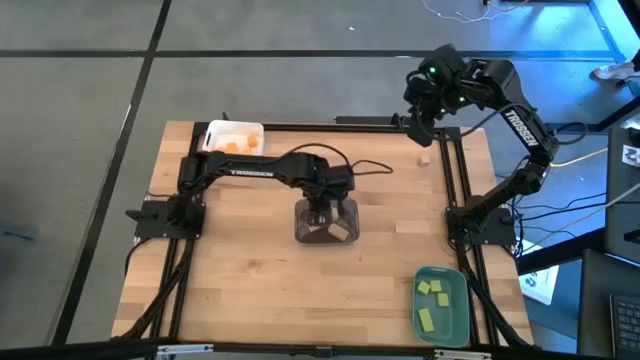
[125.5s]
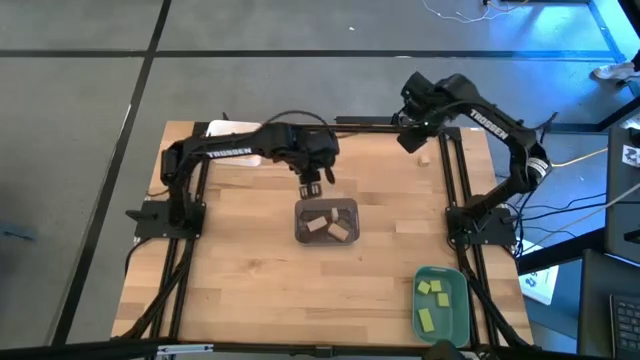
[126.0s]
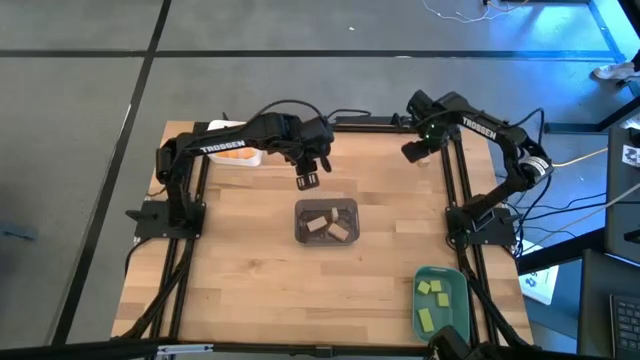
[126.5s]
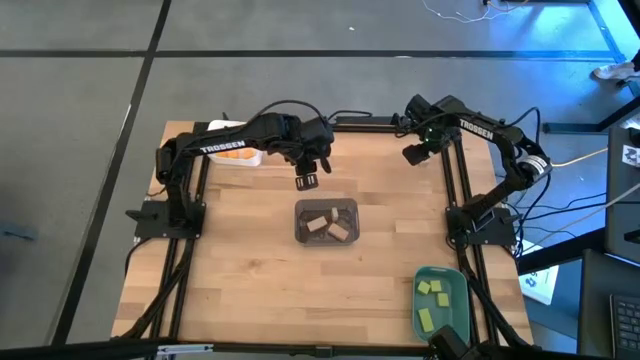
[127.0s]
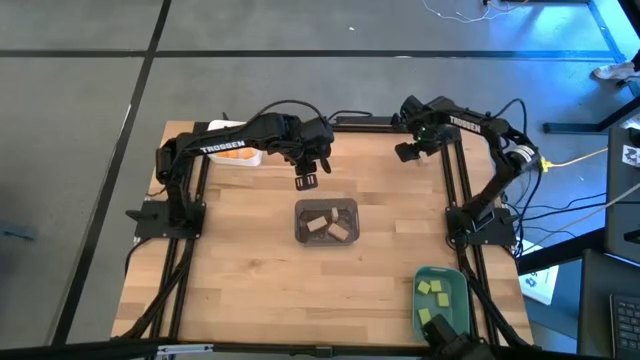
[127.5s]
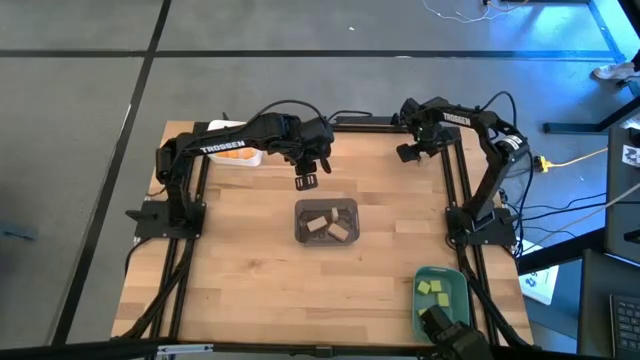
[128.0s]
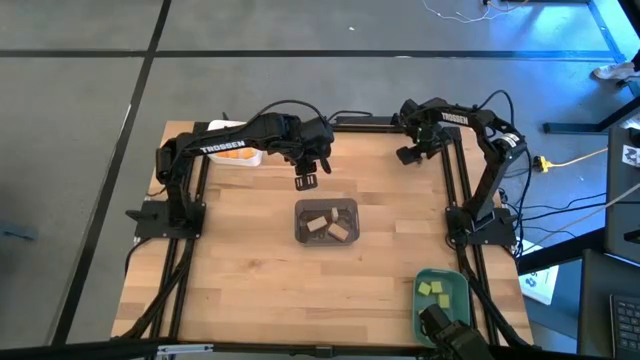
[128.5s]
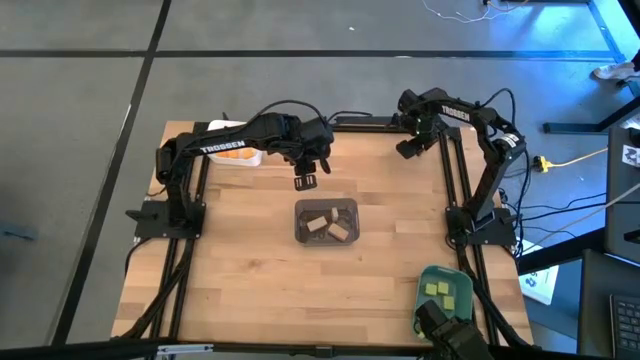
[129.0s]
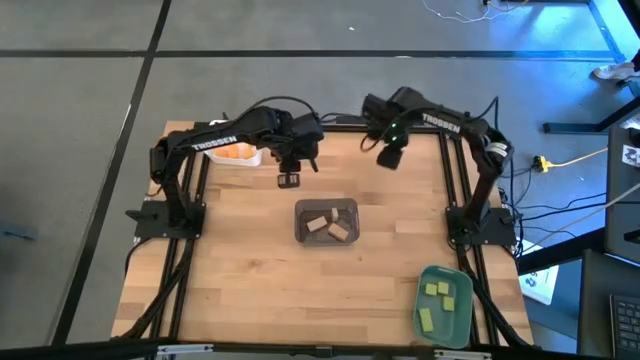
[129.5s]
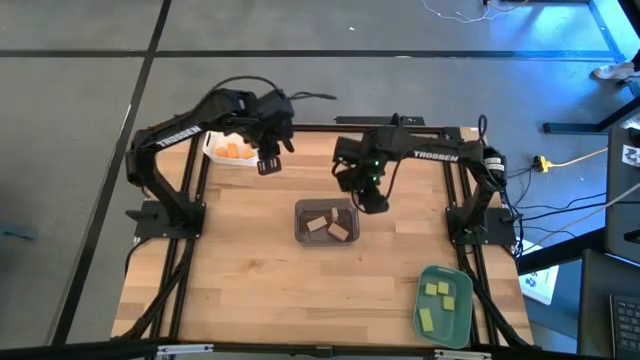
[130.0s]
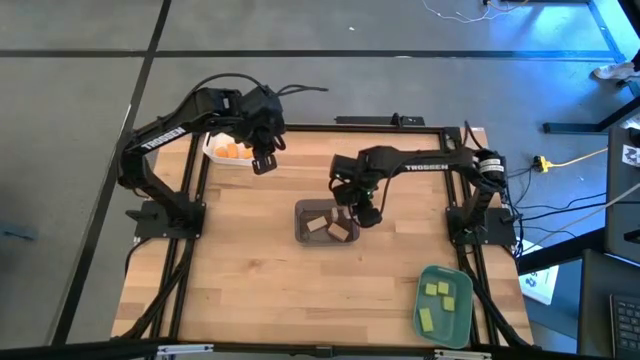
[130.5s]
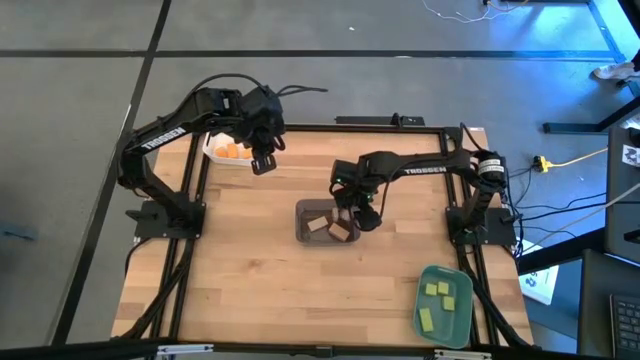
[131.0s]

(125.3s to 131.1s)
Task: Sort & place blocks by color
Put the brown block into the black bin

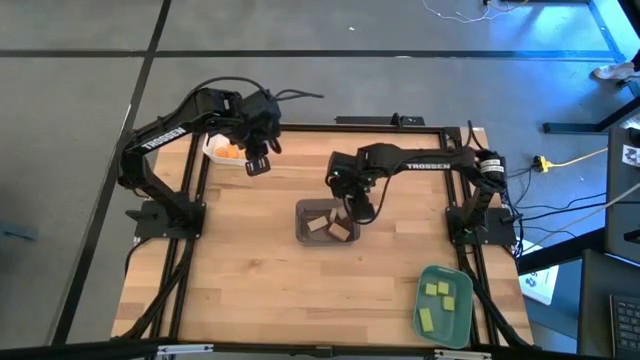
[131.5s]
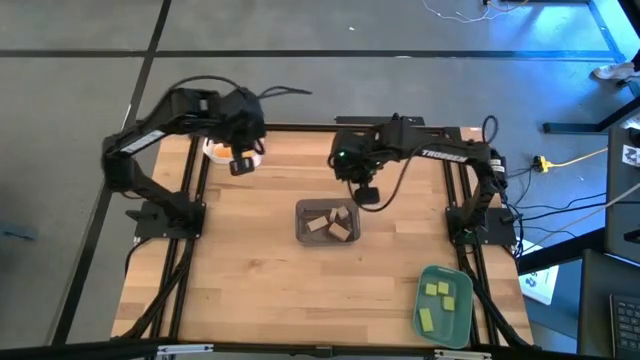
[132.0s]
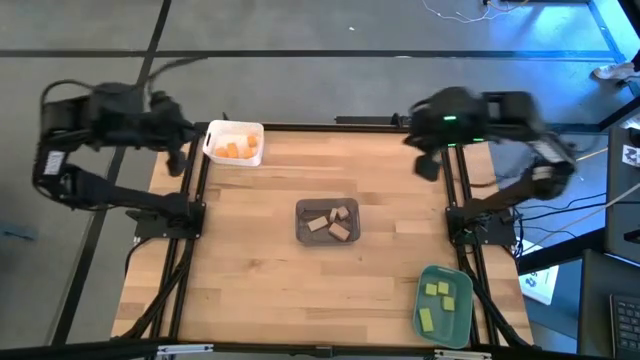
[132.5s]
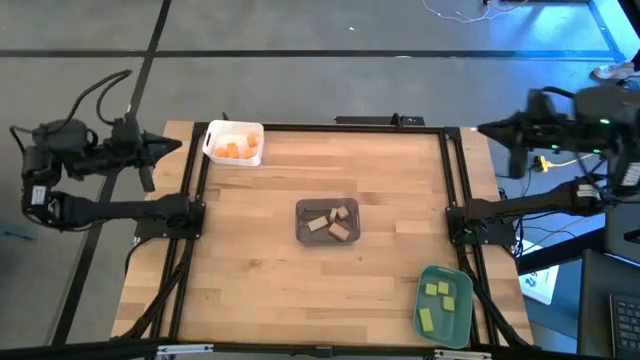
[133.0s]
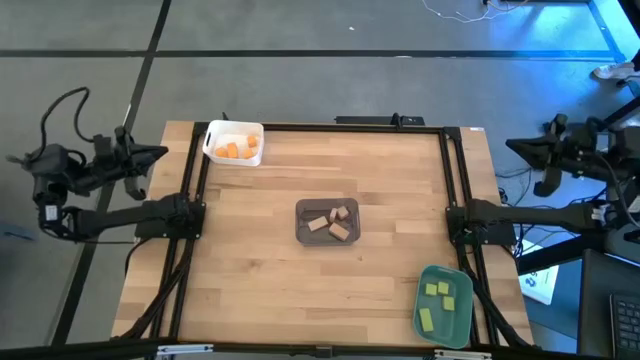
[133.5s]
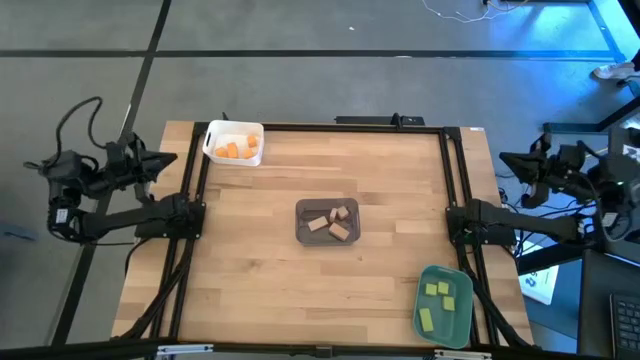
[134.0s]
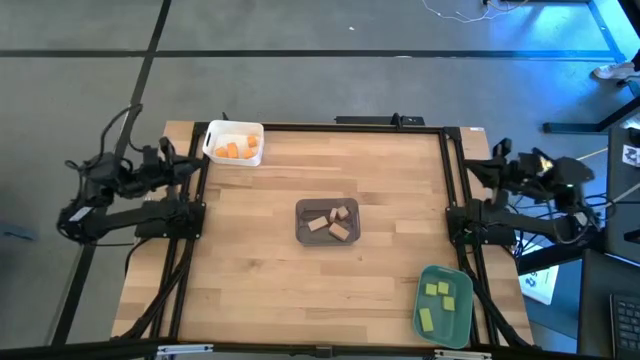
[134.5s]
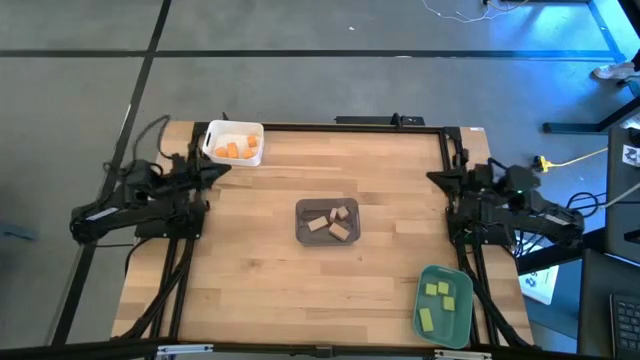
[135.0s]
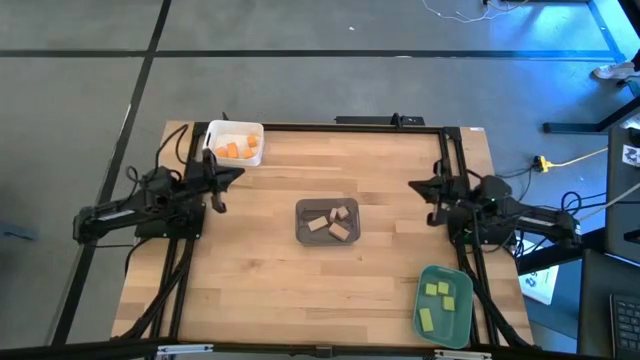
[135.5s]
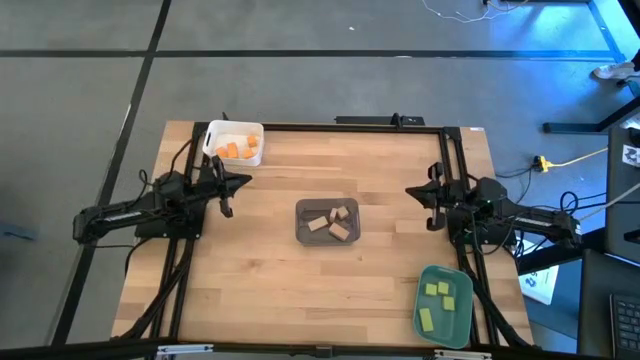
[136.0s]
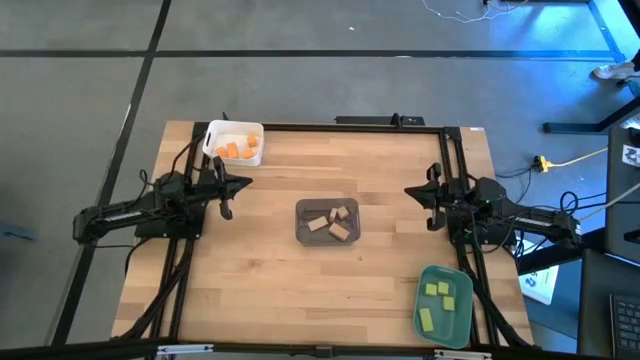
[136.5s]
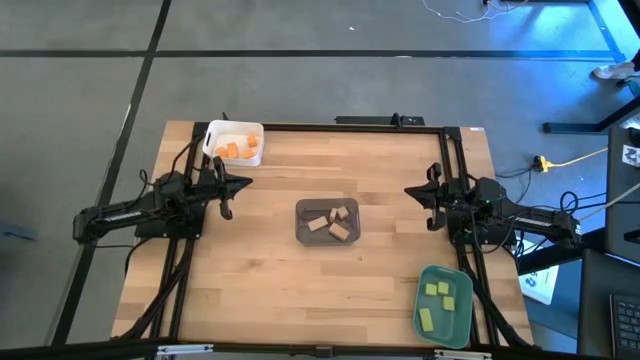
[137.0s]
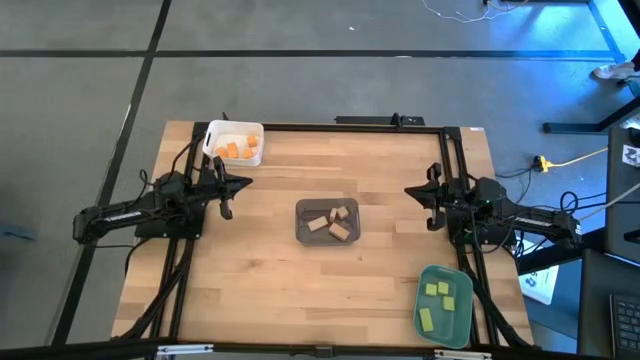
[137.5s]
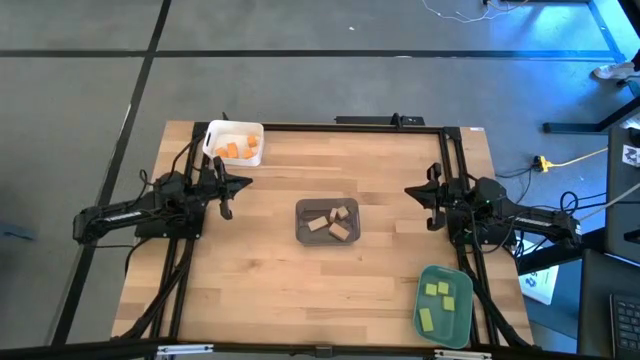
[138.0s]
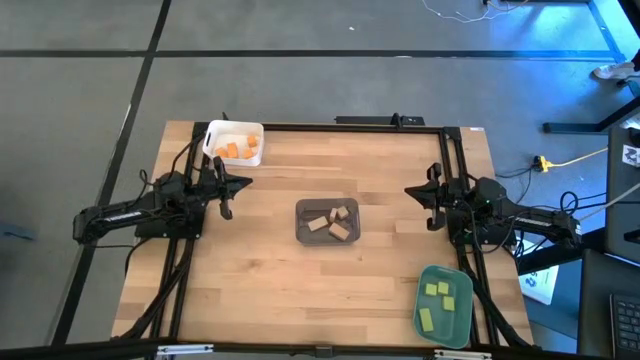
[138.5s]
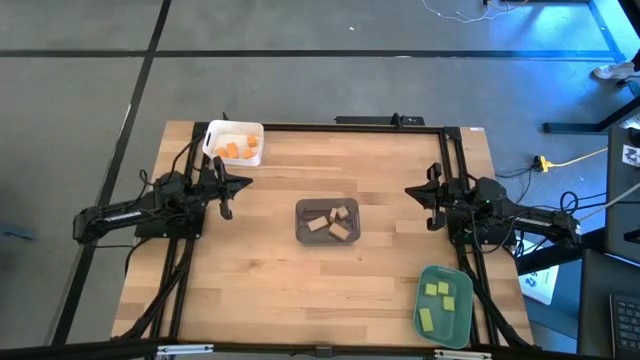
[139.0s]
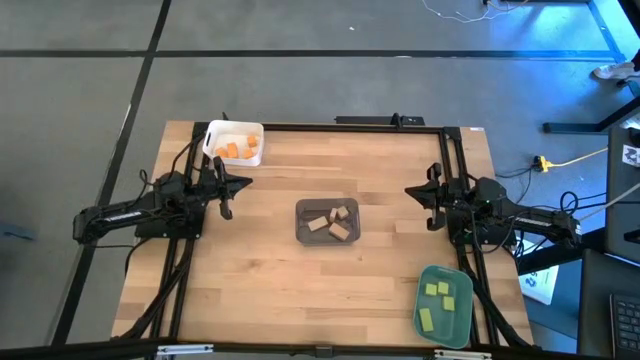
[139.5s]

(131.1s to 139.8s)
Return to Home Position

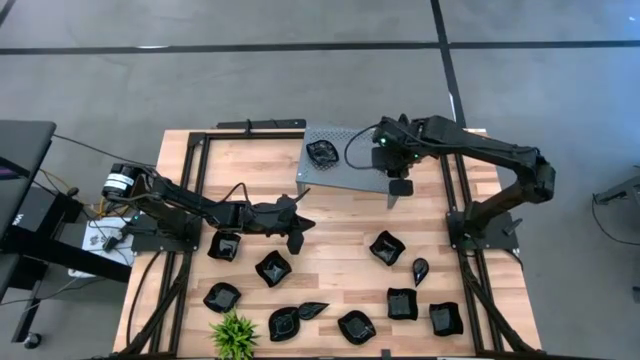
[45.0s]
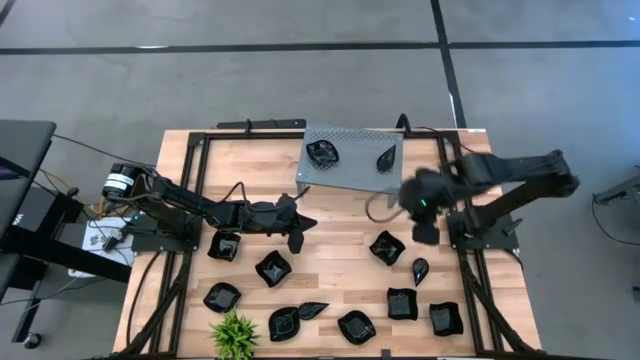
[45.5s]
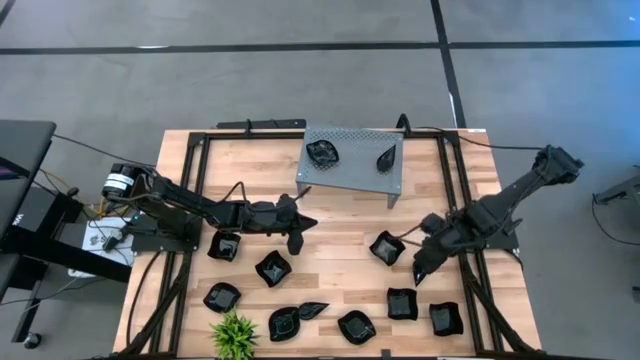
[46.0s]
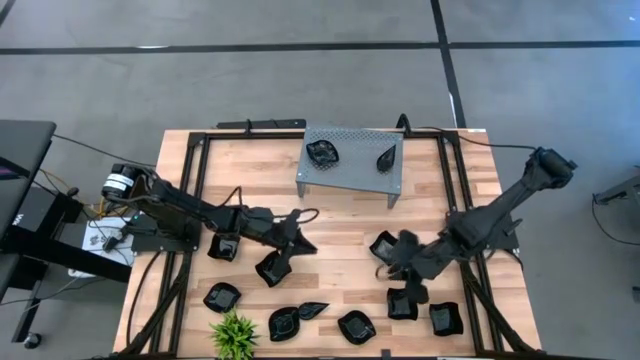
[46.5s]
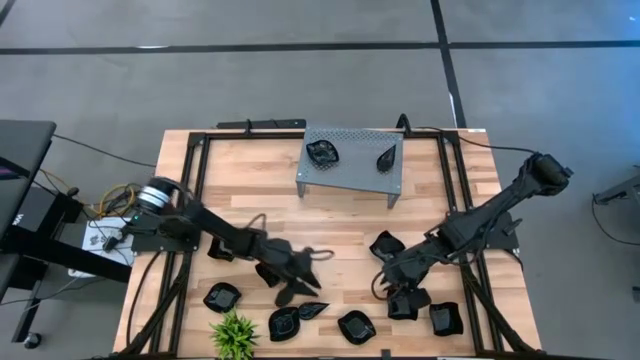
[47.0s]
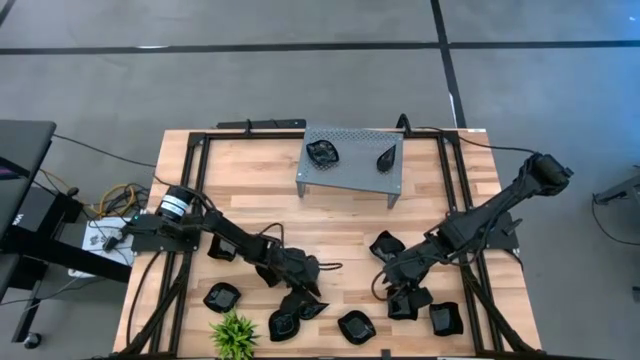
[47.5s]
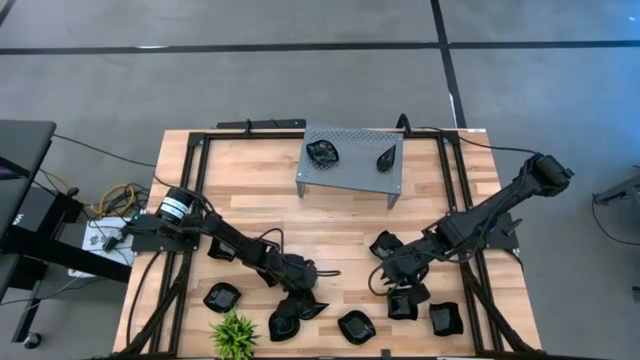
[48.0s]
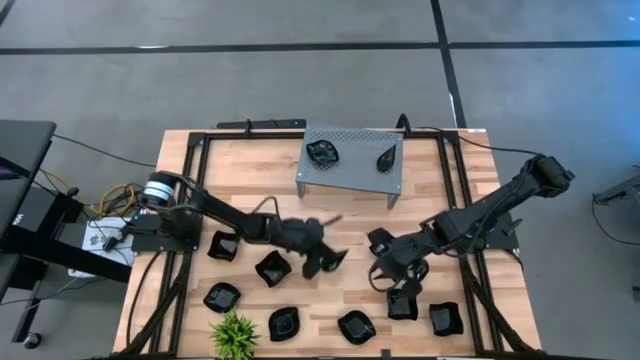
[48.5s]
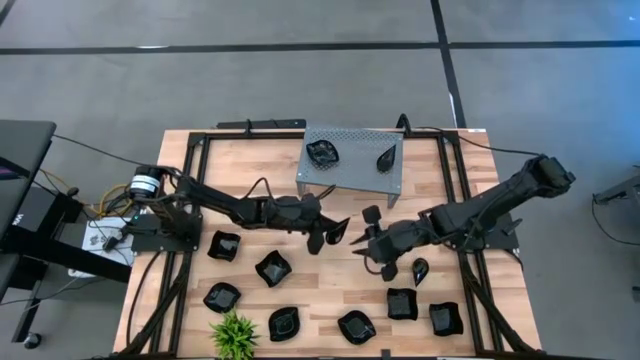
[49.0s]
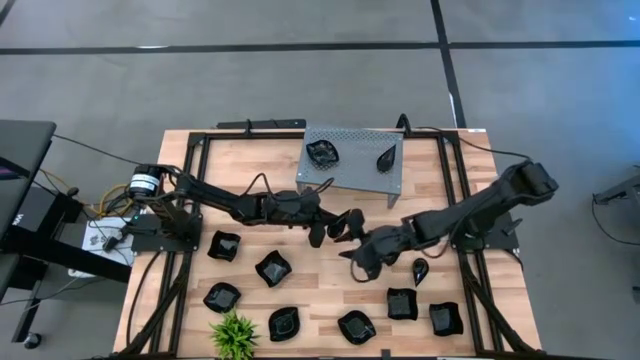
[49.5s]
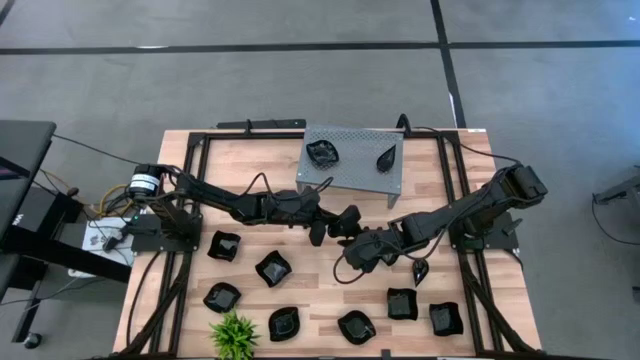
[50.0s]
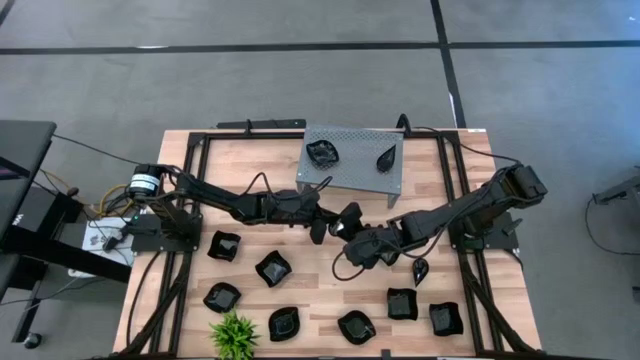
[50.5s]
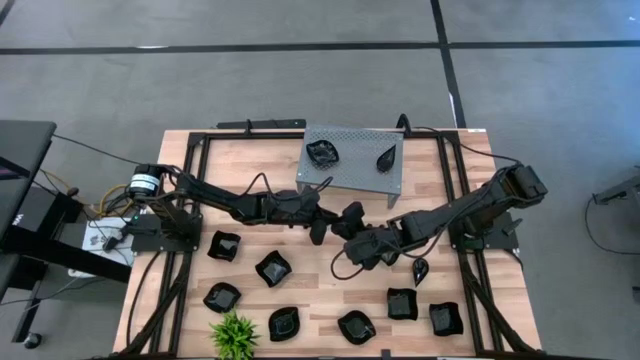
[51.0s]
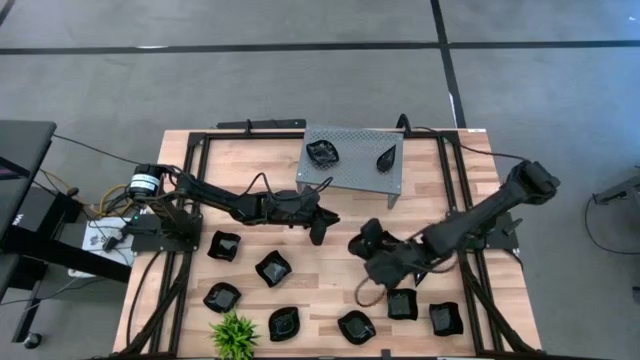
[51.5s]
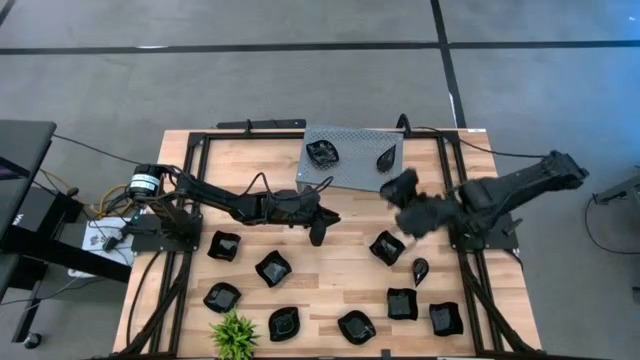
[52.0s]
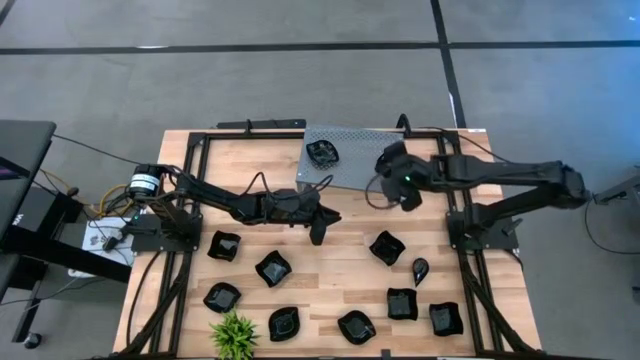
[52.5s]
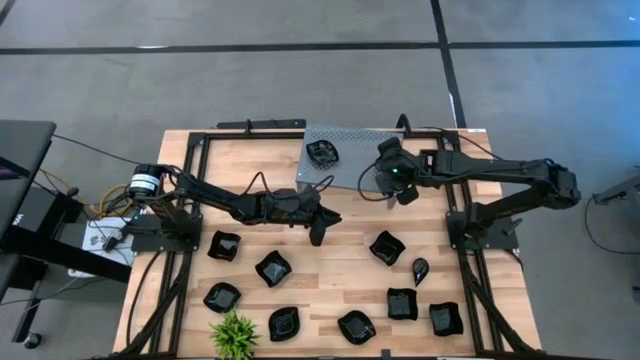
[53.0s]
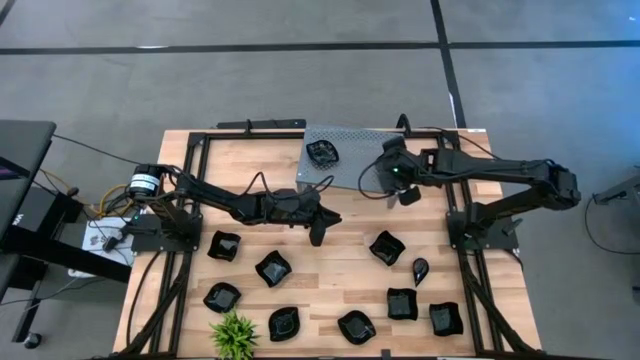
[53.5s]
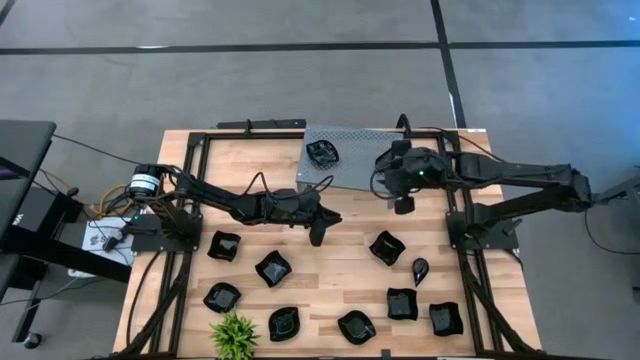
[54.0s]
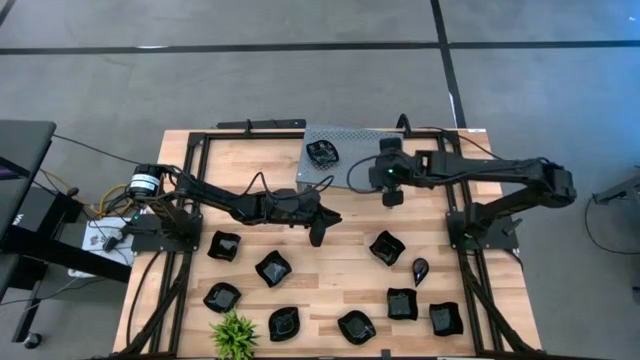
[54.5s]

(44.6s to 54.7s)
Task: Pick & Place Mini shaped plates
Stack the black drop-shaped plate on the other drop-shaped plates on the shelf
